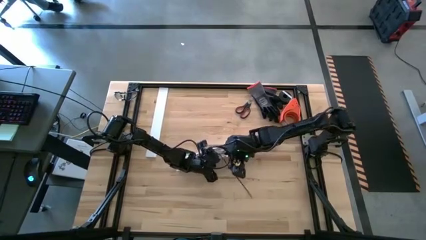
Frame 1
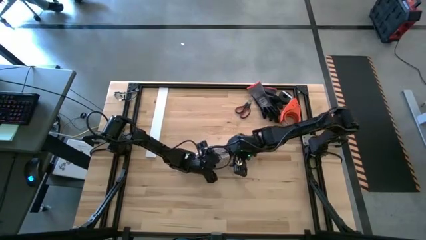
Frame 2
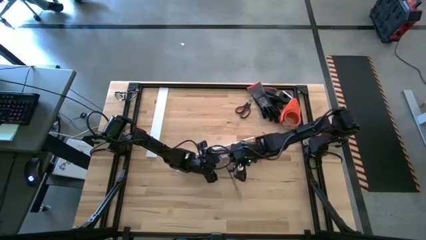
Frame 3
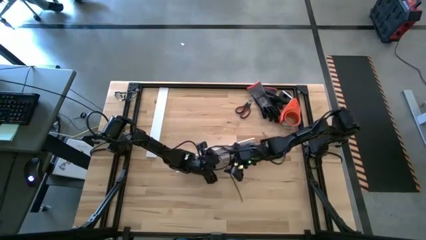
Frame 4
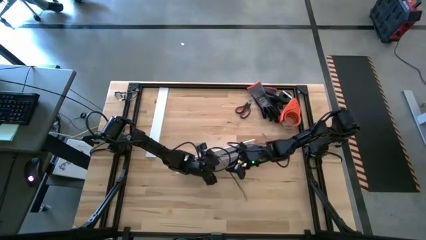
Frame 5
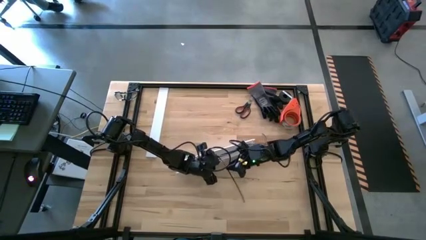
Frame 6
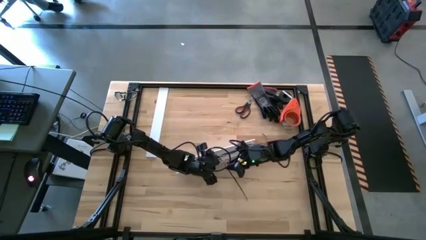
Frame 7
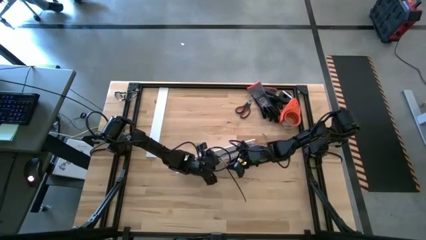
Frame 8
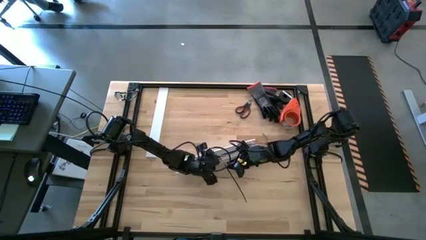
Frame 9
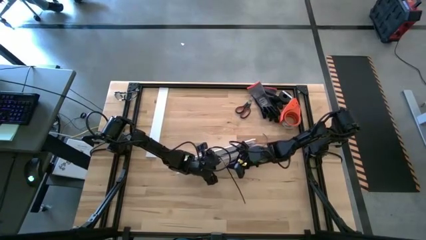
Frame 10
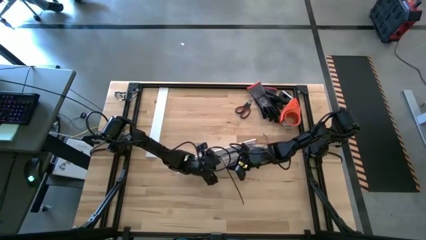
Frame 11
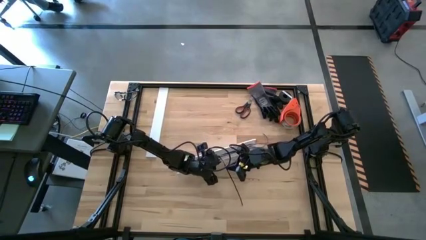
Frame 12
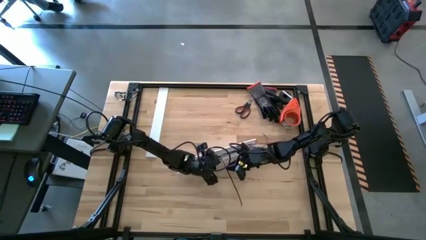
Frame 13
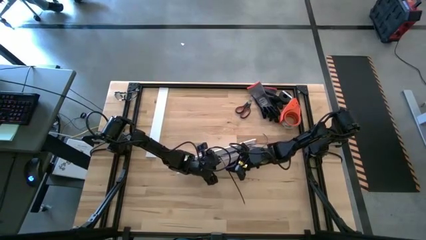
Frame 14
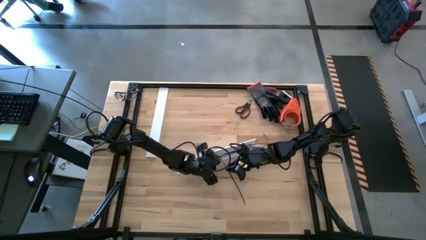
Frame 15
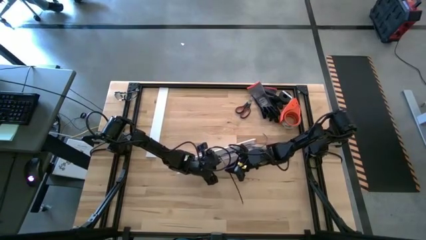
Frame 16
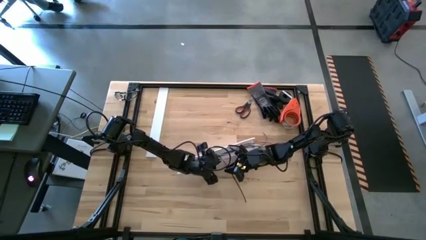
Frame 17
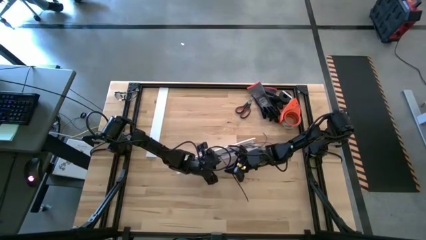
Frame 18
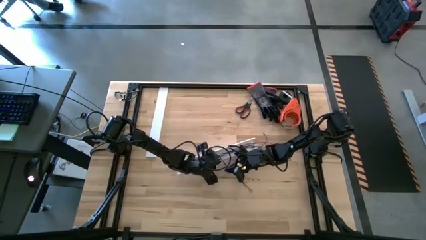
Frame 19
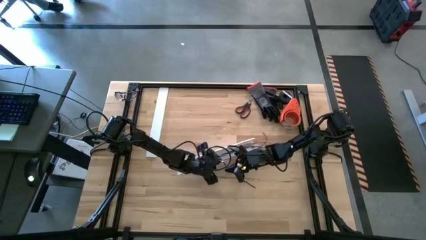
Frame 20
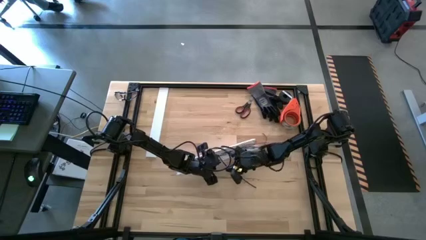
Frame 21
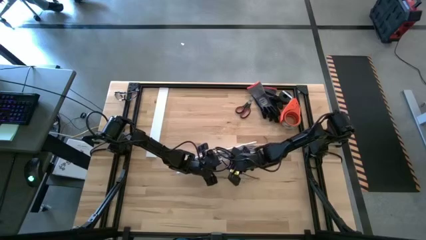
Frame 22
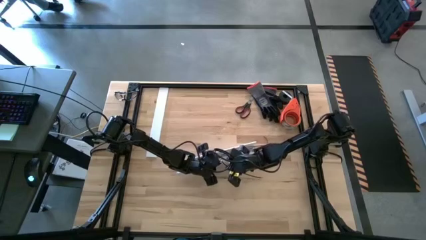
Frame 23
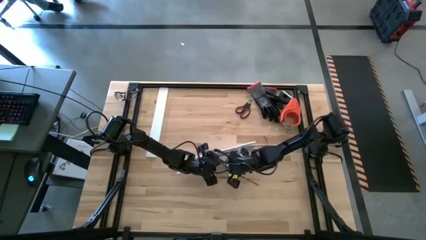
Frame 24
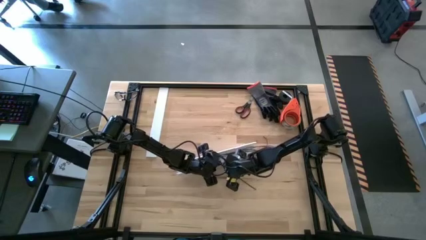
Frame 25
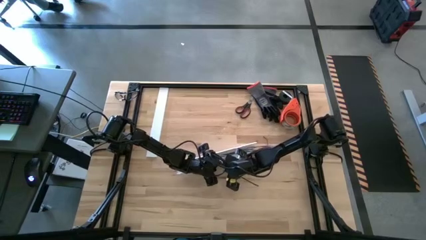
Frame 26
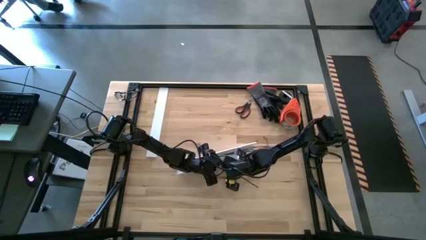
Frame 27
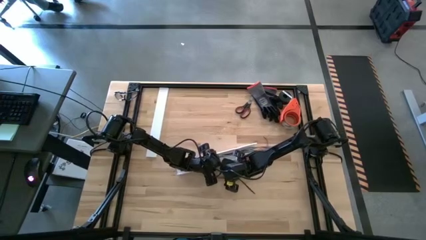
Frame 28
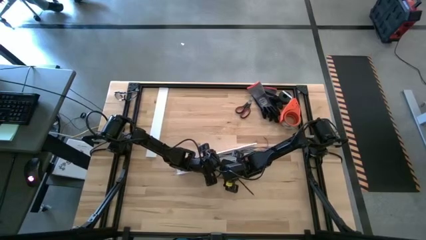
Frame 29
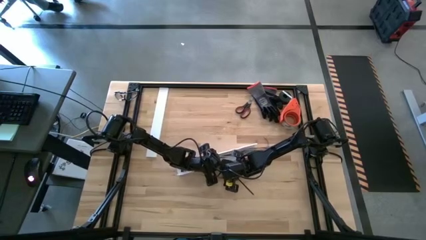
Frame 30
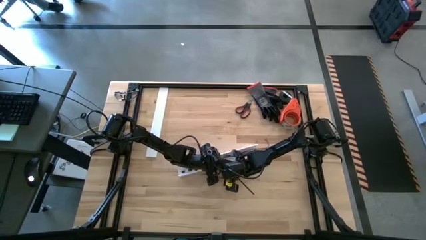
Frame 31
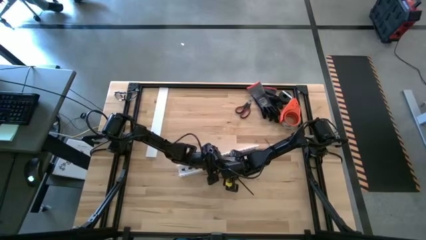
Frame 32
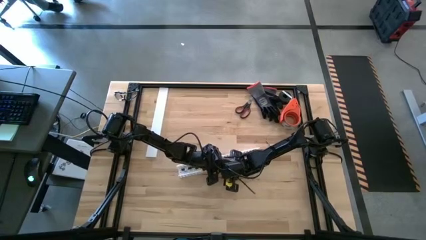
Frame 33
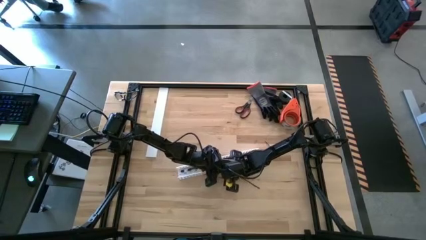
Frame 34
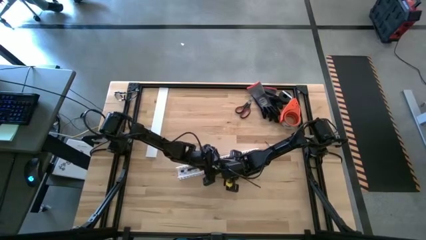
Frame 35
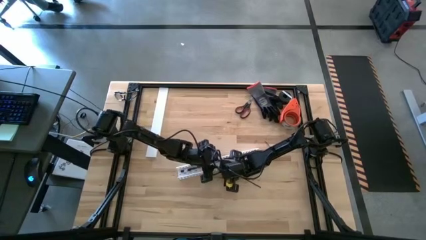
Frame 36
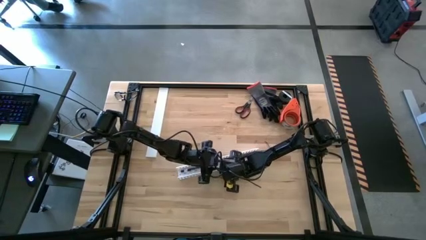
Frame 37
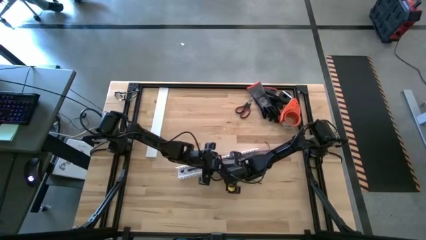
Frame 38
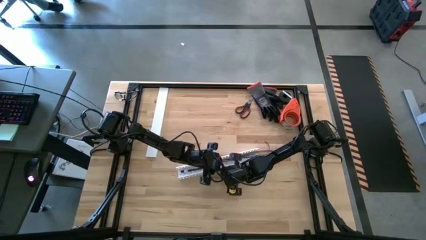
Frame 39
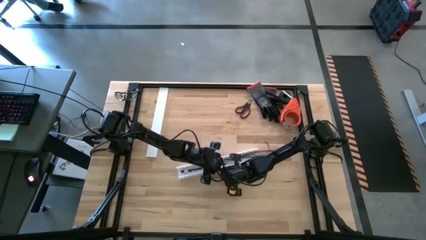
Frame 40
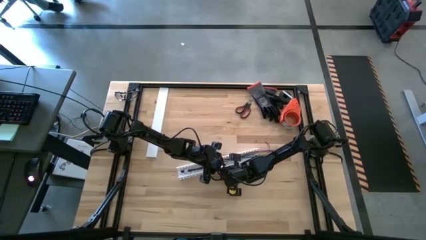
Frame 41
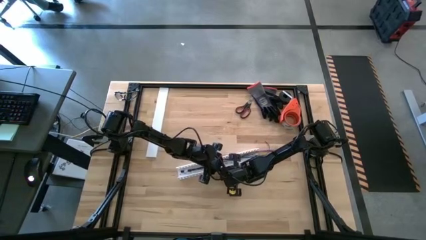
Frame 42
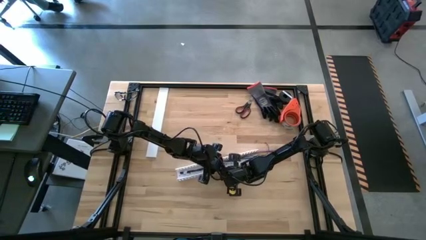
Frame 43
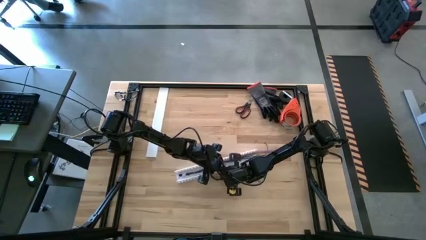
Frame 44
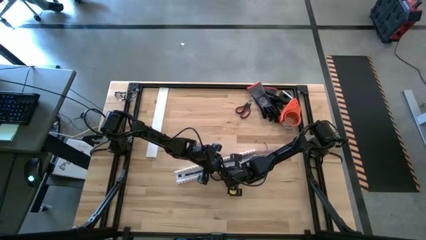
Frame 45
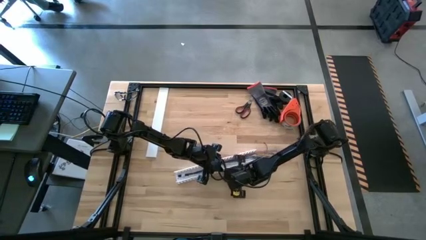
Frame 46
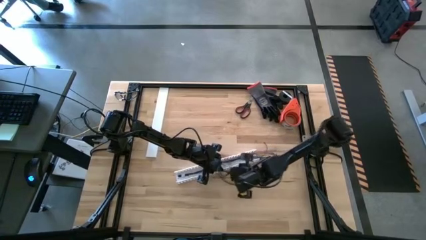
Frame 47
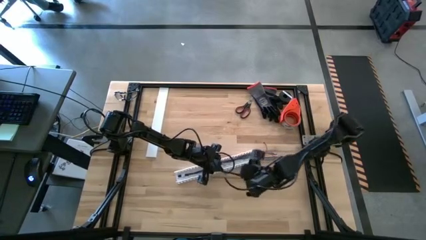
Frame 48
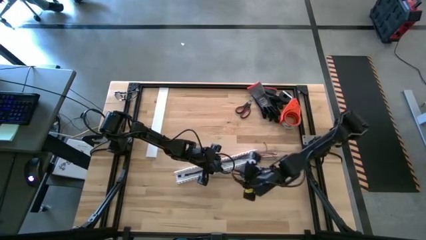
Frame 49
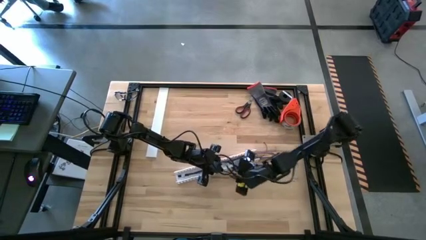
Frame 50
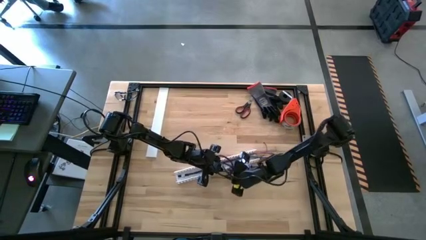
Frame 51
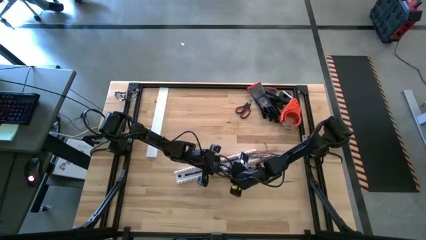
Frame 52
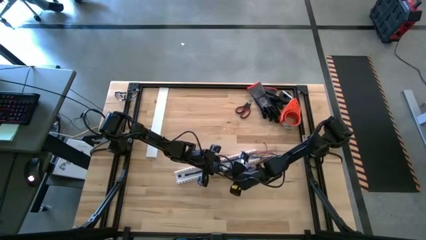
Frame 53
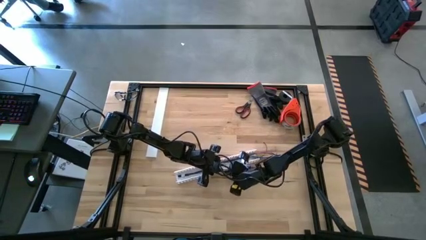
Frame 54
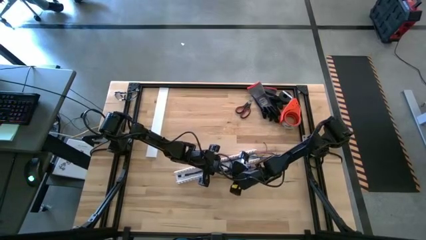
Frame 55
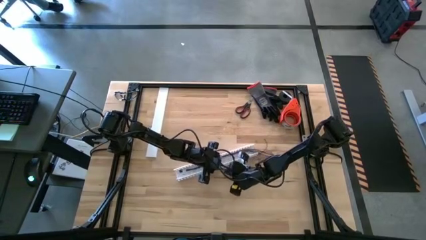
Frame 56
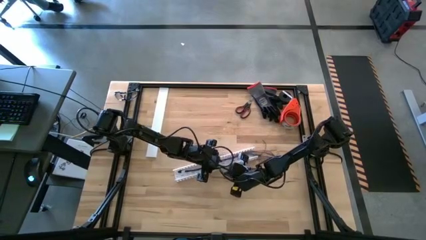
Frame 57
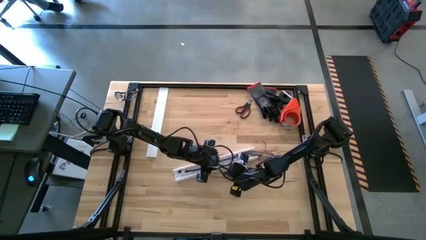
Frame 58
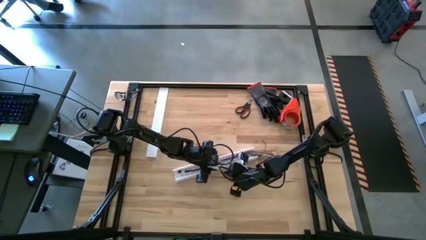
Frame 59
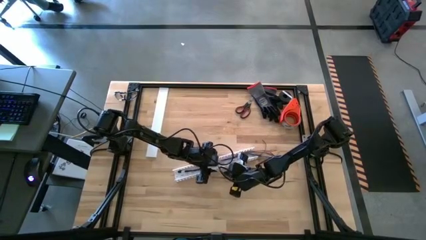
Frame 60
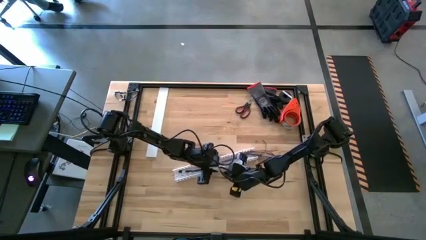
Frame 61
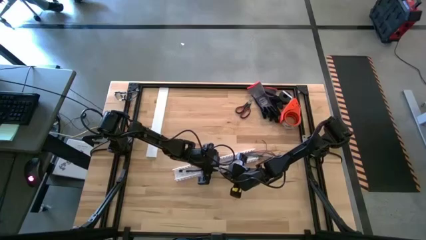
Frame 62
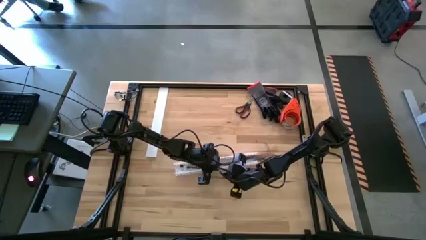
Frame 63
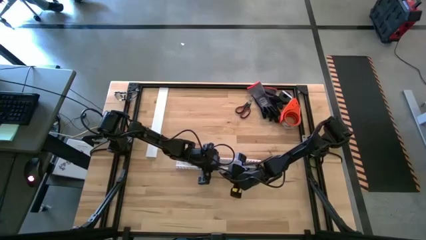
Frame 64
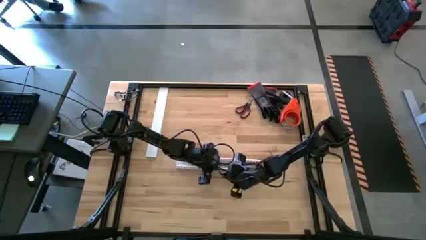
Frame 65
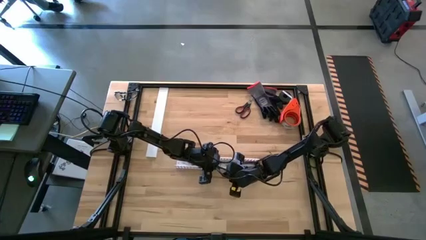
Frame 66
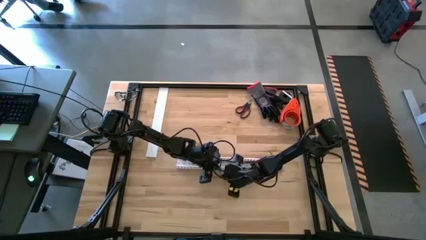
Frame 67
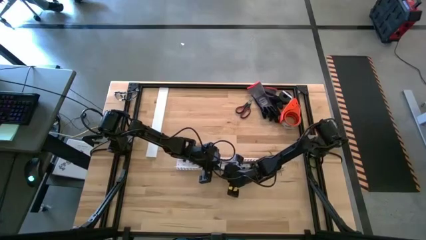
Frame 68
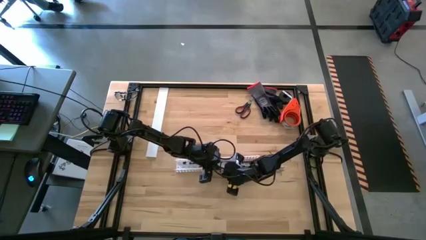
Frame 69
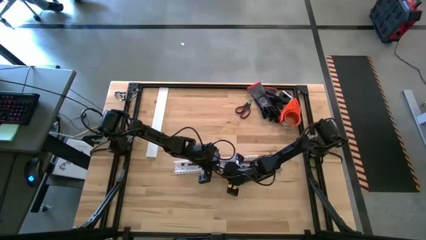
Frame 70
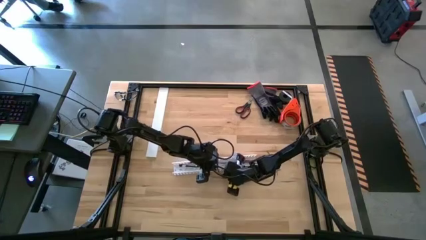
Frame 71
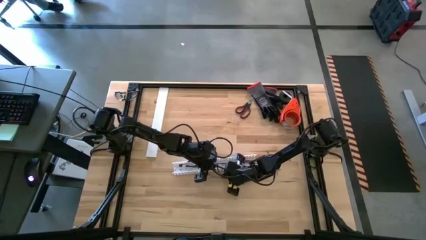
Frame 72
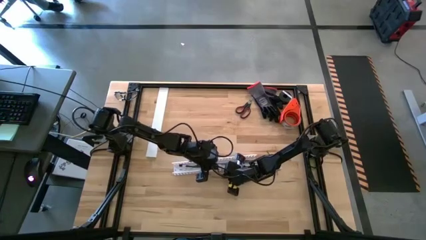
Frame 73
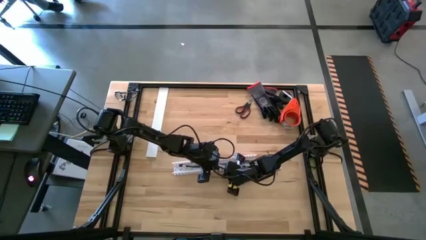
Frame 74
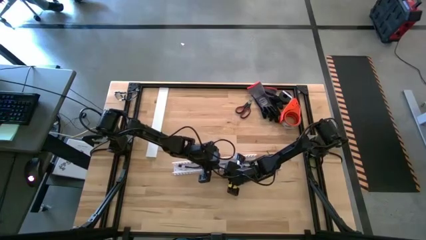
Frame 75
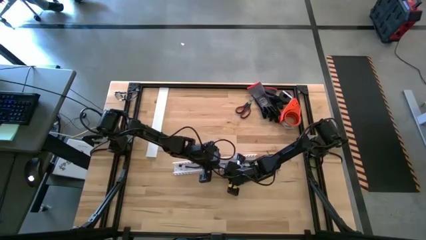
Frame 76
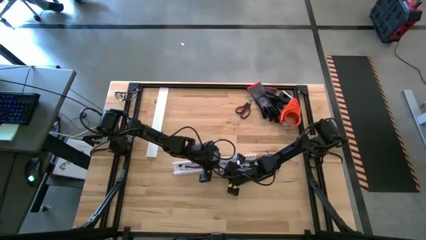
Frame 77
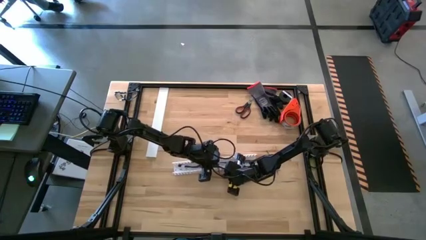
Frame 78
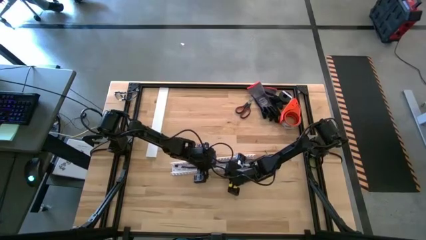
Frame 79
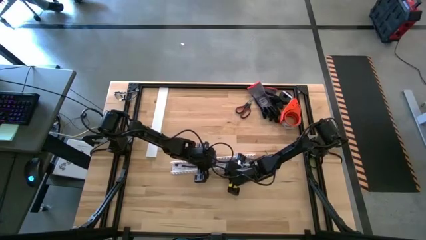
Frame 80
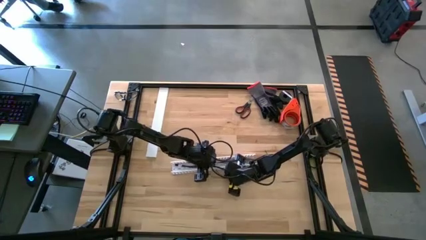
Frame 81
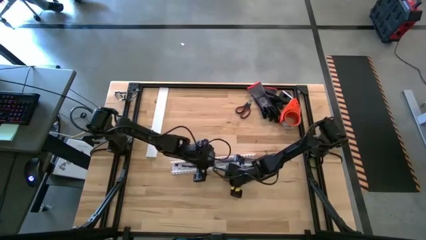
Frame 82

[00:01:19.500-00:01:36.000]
Task: Ziptie cables
Put the ziptied cable wires into the white cable duct

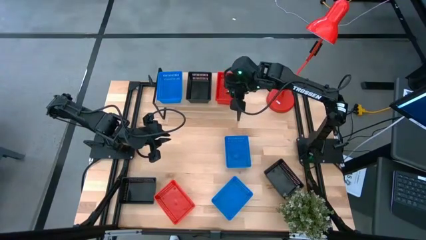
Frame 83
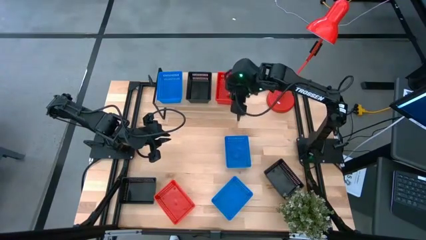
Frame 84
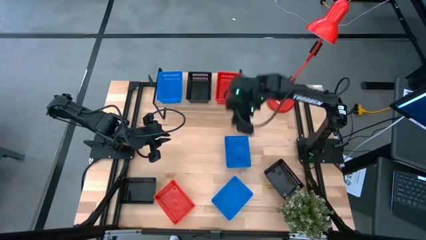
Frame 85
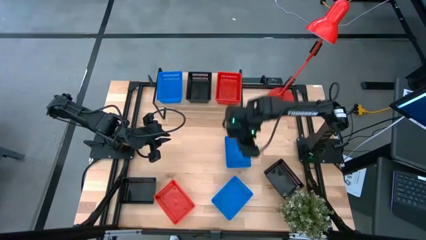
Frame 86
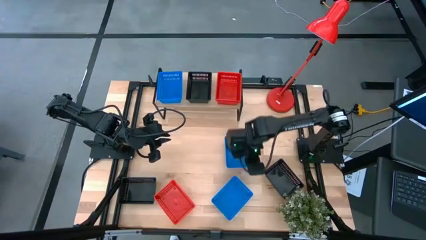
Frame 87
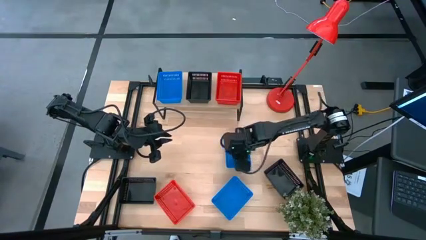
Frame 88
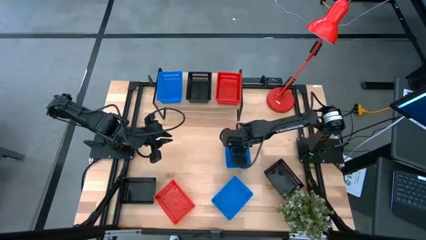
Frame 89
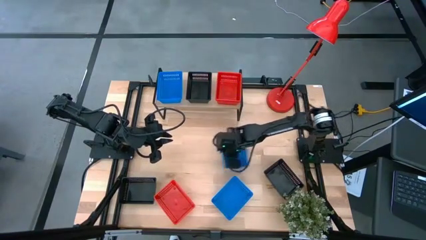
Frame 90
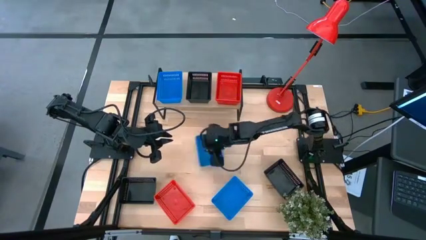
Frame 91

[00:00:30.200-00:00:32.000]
Task: Stack baskets on shelf by color
Move the top blue bin to the center of the table
